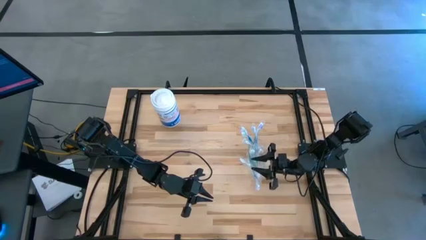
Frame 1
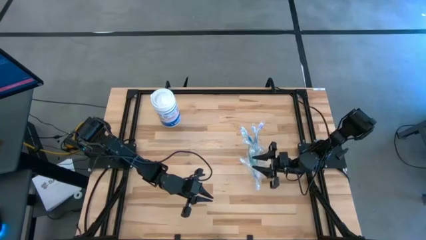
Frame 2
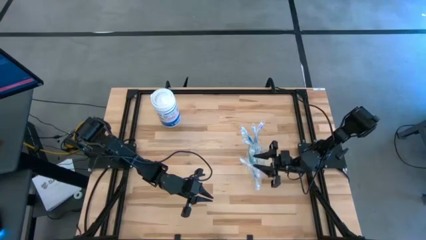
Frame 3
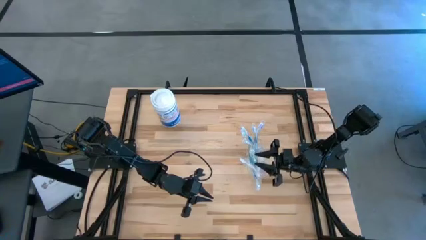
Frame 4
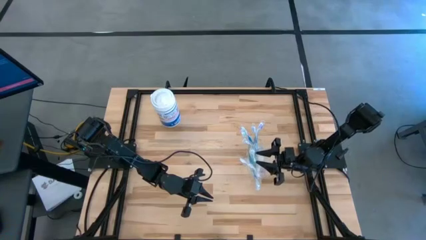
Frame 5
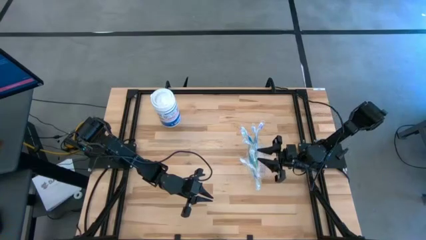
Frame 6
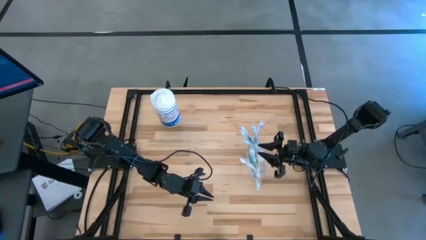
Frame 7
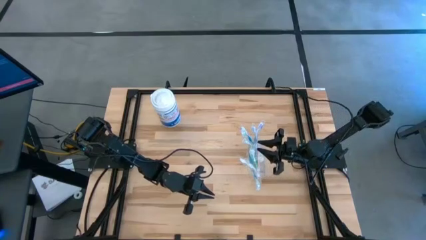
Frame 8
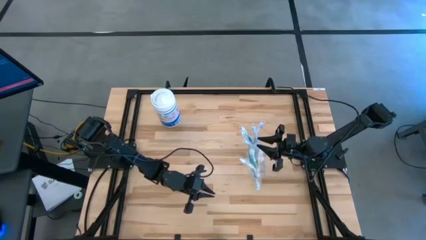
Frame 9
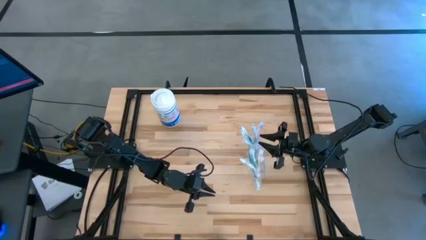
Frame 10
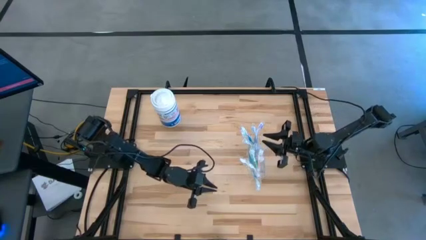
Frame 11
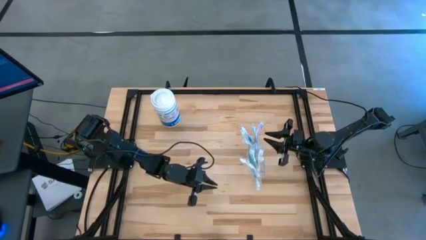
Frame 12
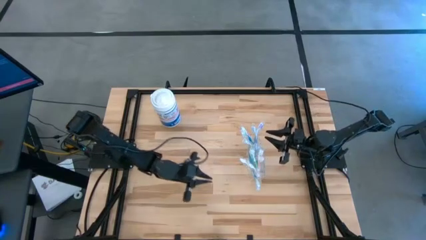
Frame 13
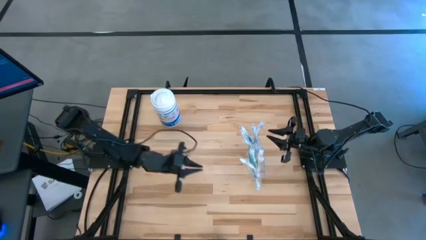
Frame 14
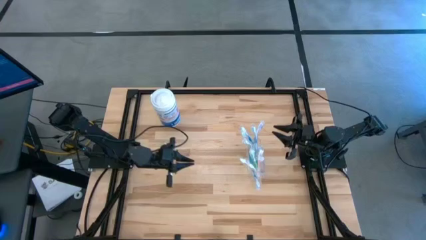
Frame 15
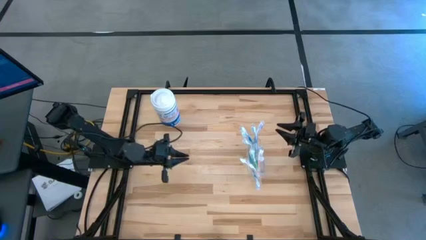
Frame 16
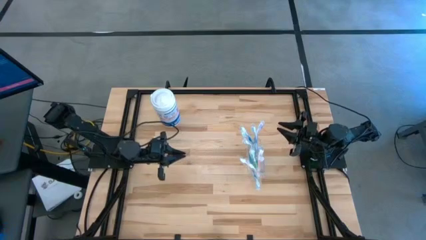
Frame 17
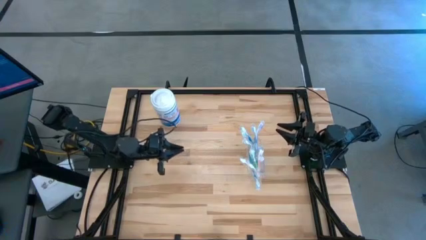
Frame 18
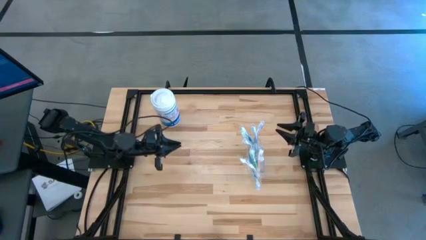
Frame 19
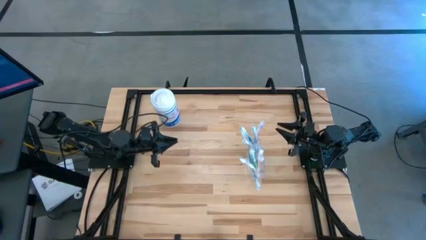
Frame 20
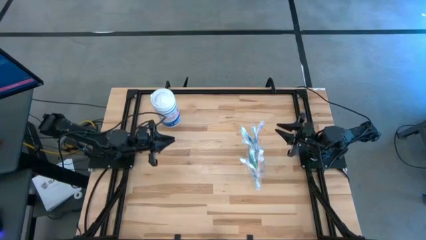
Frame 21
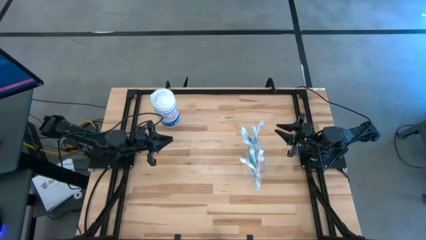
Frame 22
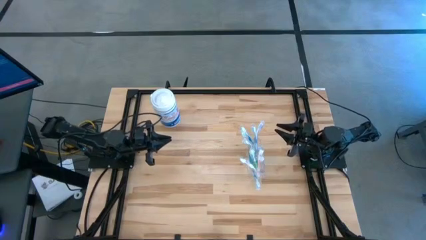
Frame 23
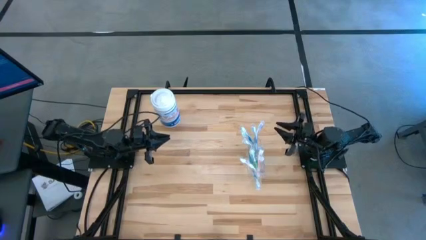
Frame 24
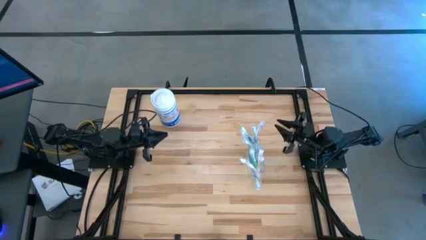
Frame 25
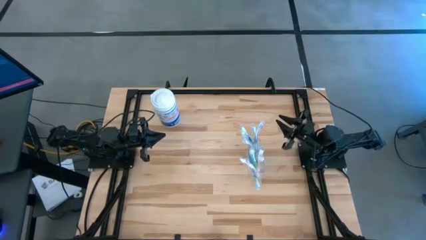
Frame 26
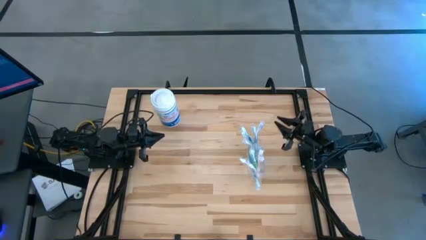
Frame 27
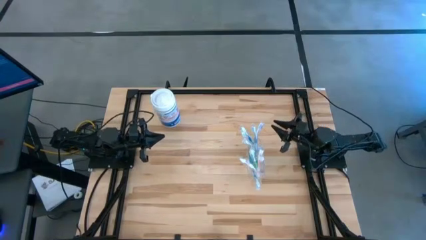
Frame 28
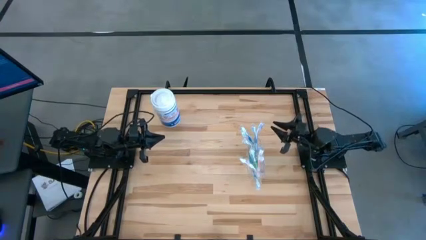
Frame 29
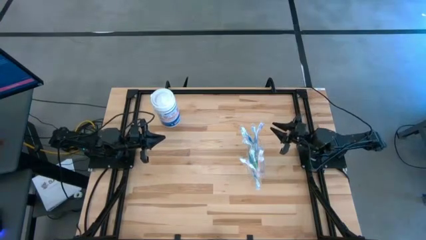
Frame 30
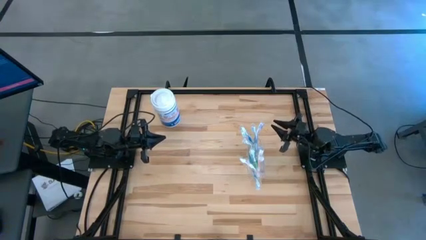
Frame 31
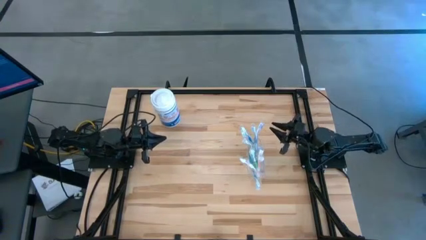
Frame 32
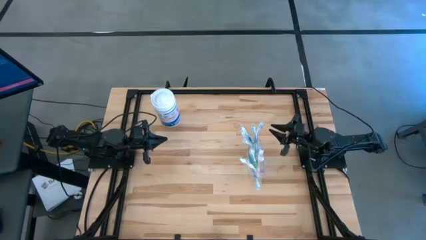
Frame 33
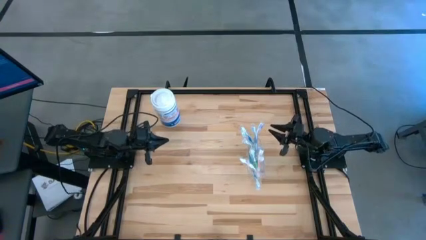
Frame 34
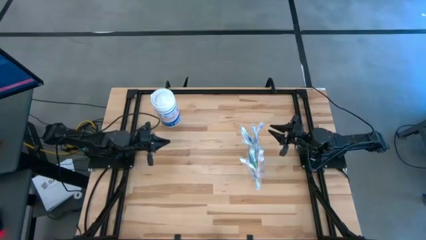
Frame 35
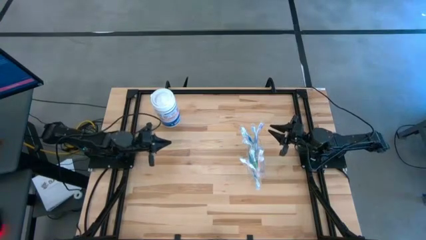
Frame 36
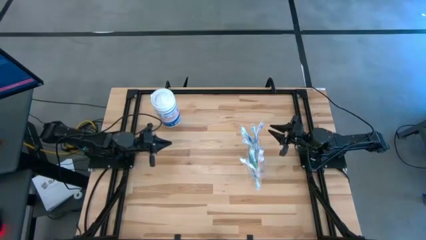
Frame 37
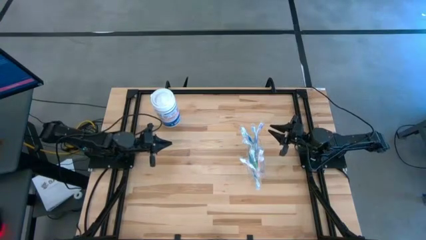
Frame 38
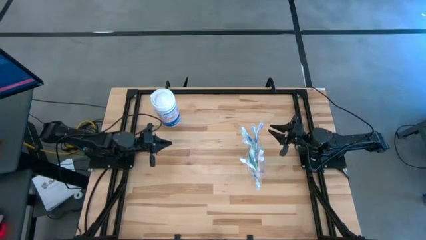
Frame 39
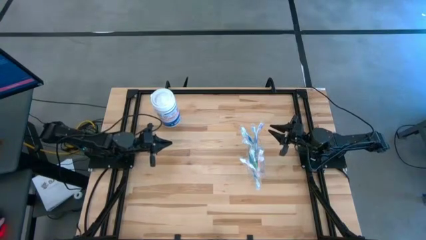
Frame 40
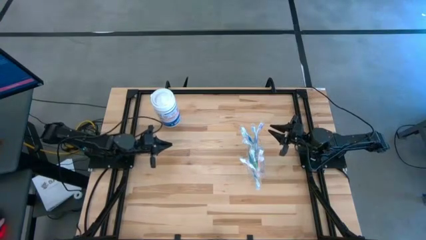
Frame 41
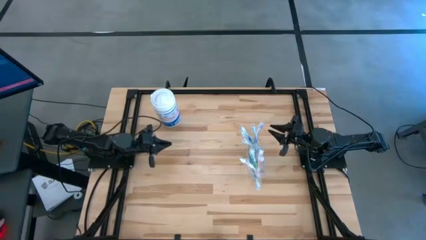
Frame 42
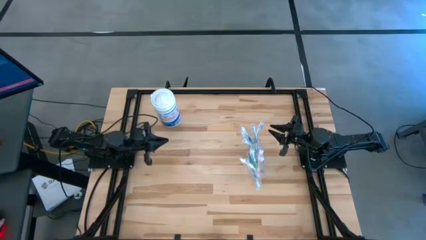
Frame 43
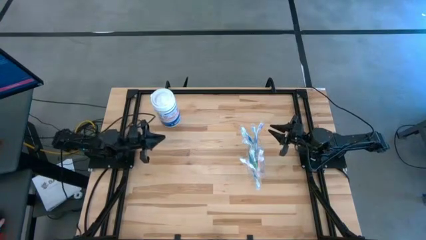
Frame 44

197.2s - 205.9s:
Task: Pick & Place toothbrushing station
Return to Home Position

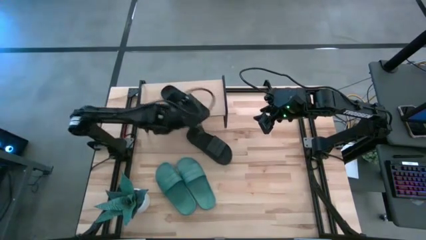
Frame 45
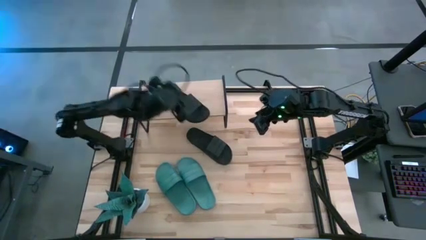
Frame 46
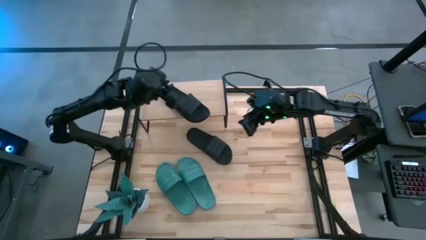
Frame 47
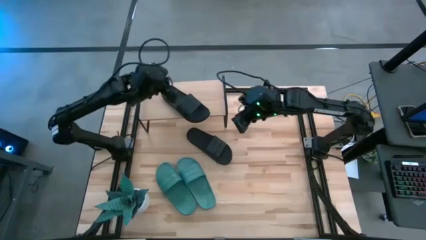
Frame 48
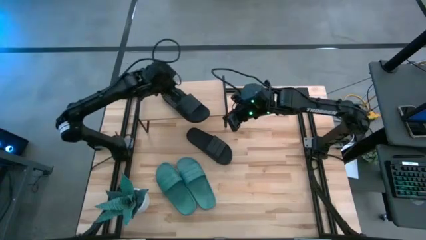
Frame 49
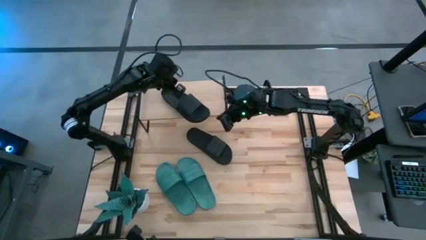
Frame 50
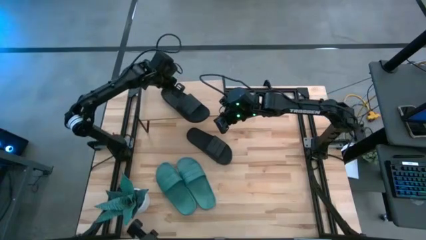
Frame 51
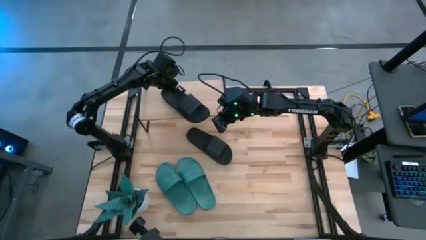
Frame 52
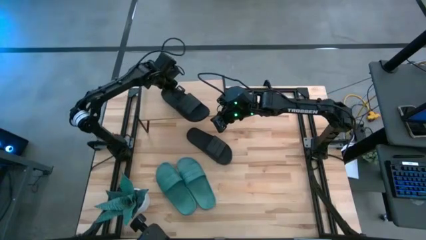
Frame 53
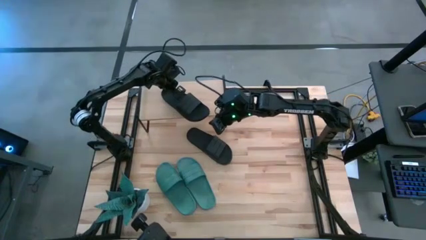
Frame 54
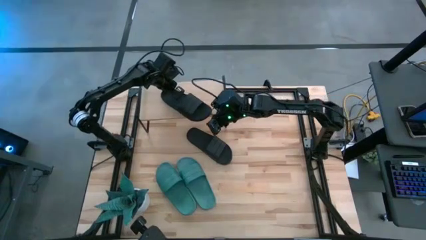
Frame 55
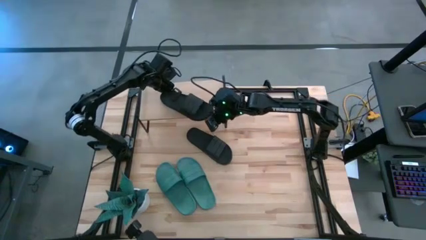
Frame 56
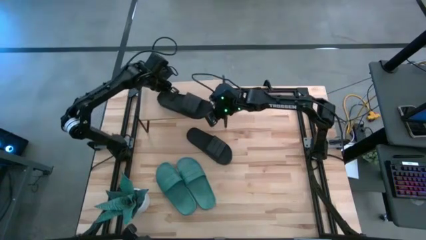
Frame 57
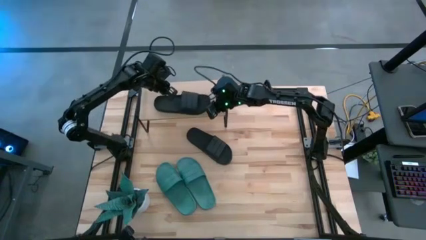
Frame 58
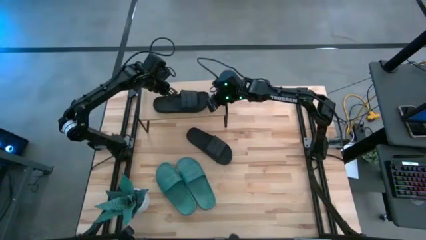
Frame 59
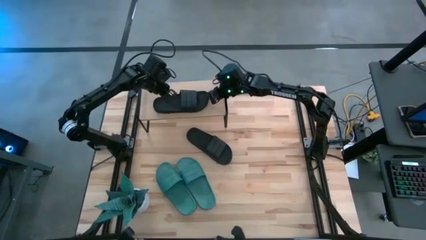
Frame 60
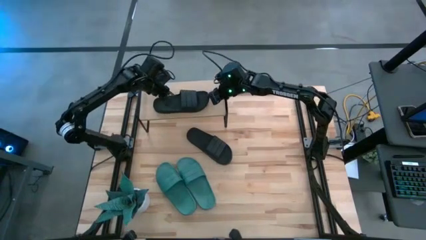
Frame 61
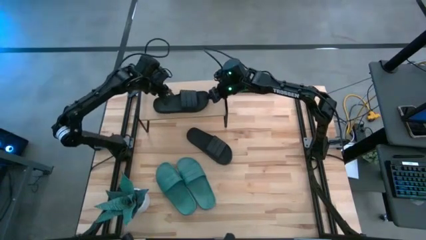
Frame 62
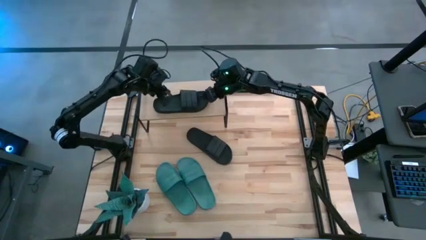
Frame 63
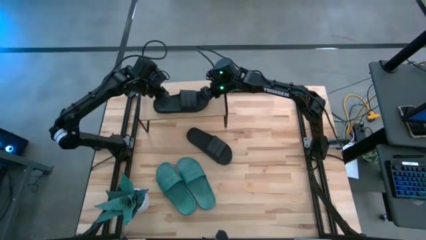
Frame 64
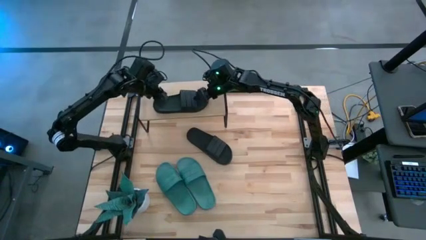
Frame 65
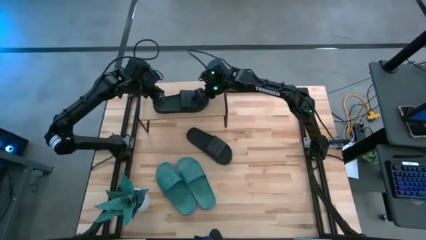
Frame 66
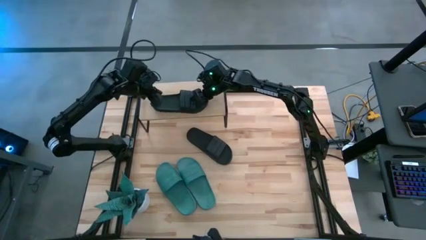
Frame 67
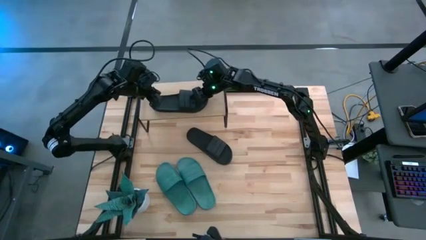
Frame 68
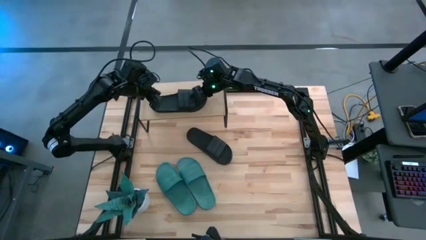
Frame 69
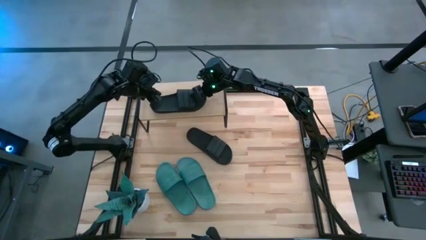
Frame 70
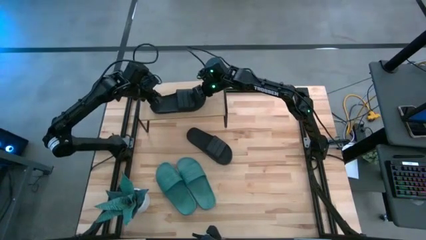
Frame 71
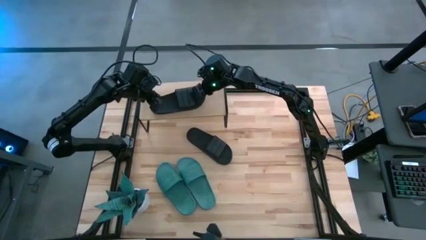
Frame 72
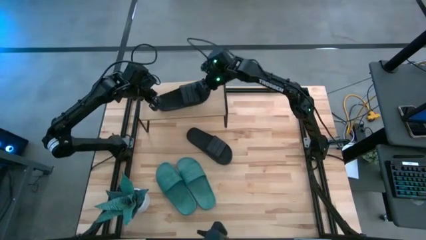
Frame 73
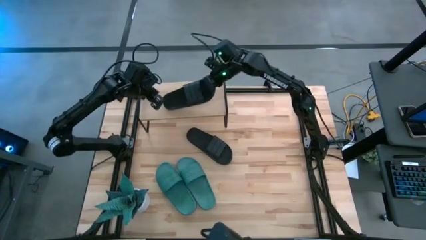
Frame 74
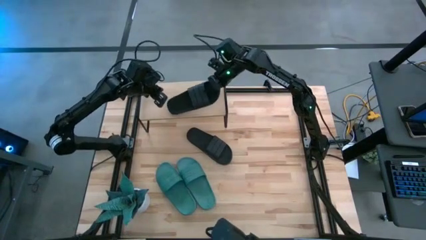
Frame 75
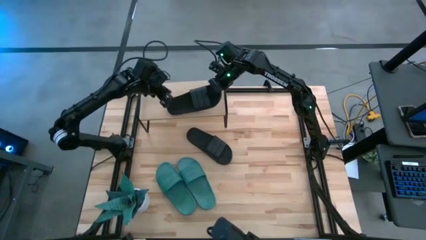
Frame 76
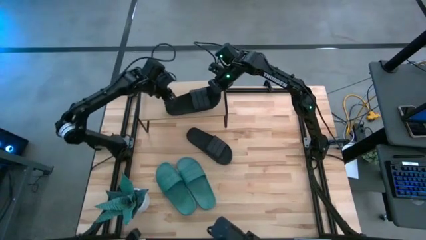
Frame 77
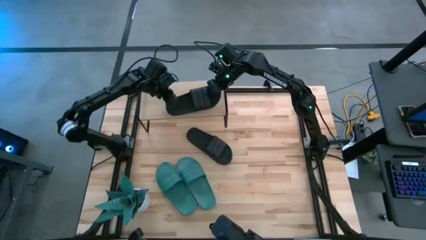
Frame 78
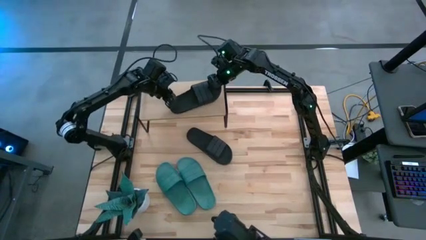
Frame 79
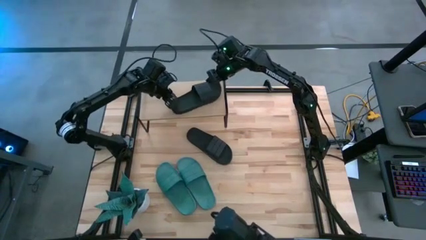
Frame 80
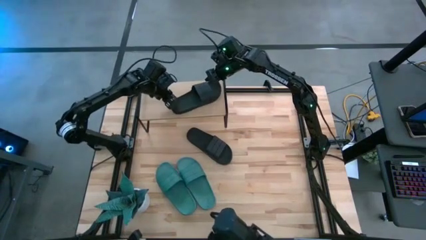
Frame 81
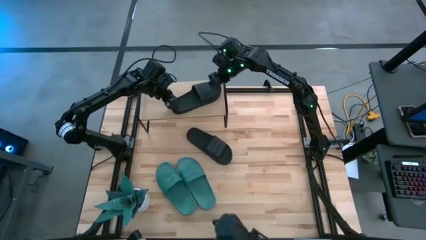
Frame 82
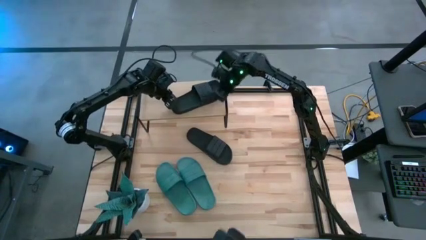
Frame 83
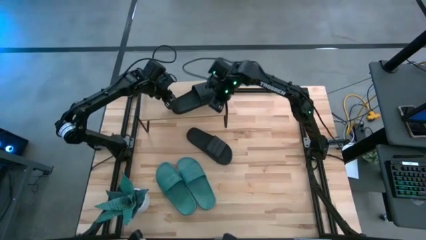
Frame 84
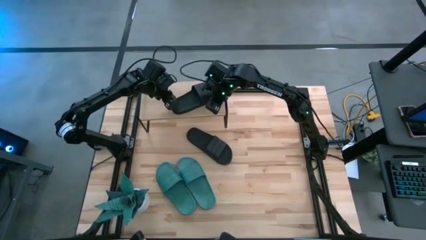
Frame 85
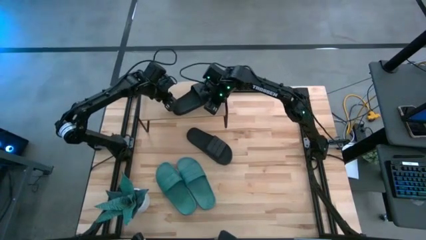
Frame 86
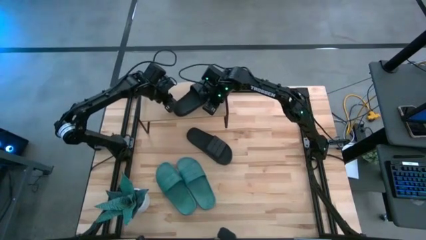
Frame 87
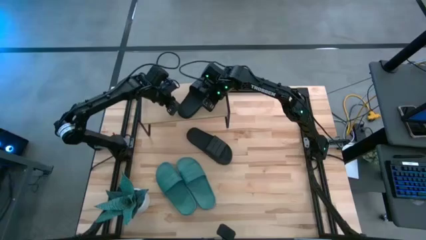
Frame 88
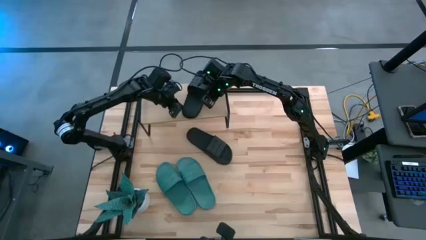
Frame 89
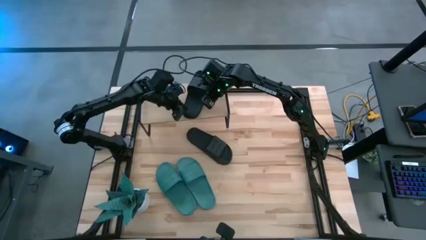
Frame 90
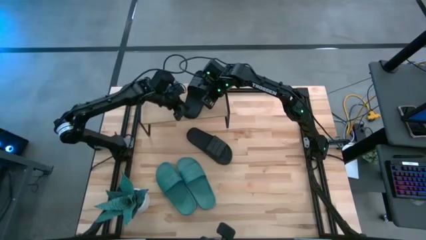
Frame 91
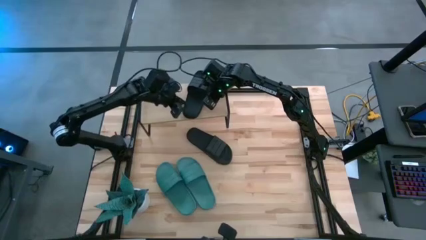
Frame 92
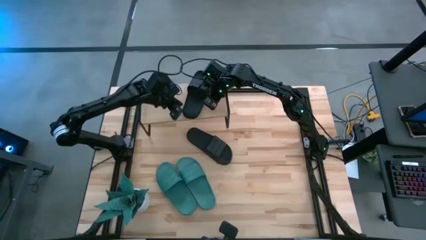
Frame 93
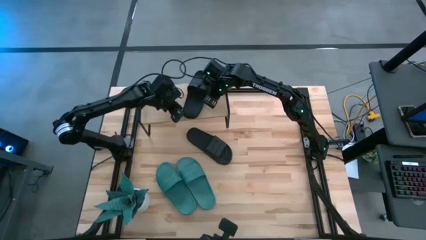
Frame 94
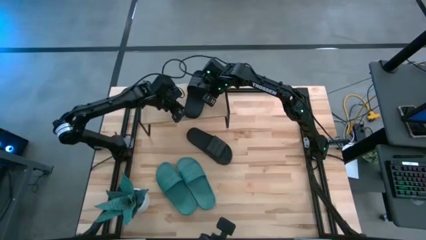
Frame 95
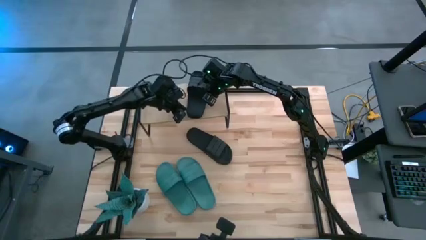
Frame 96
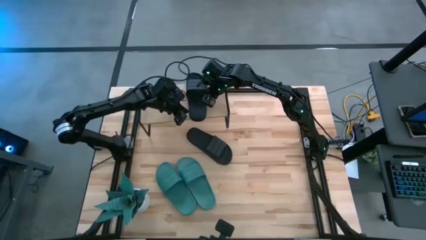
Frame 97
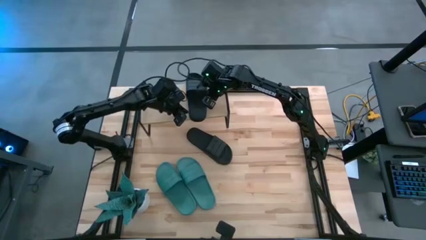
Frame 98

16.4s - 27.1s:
Task: Pick and place slides into the shelf
Put the black slide on the shelf
